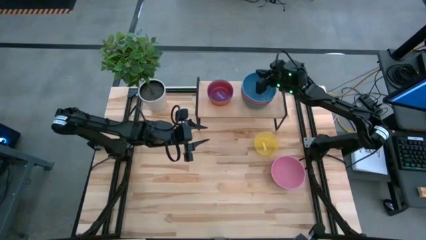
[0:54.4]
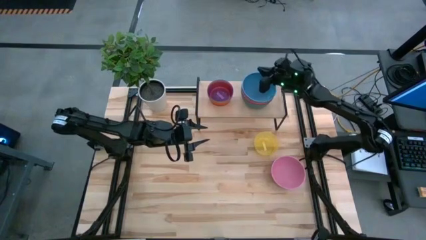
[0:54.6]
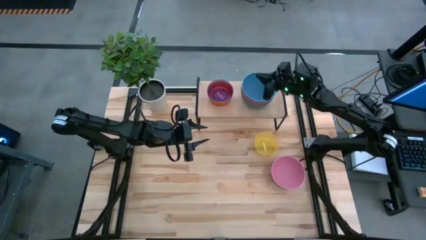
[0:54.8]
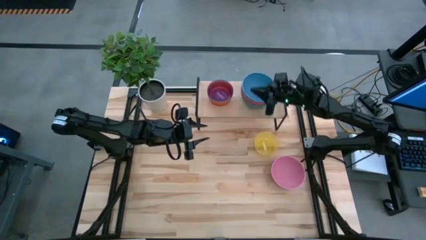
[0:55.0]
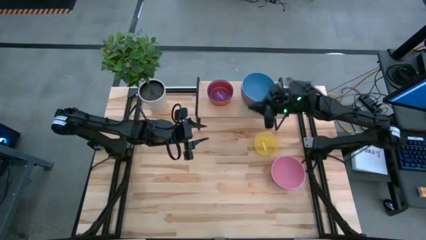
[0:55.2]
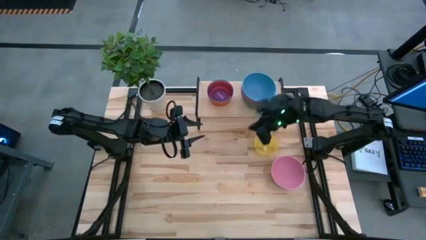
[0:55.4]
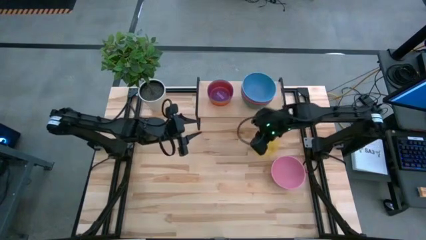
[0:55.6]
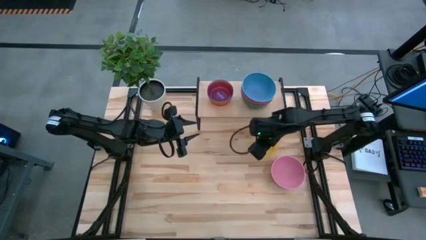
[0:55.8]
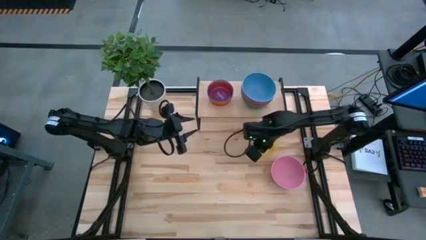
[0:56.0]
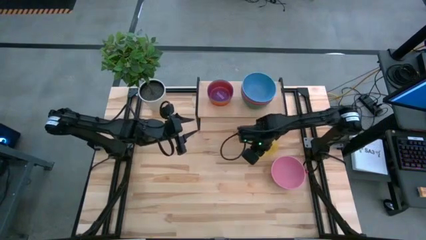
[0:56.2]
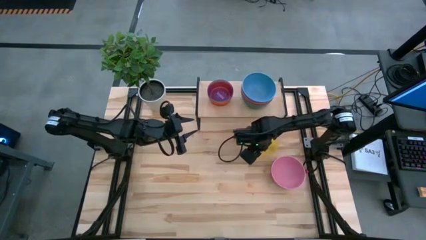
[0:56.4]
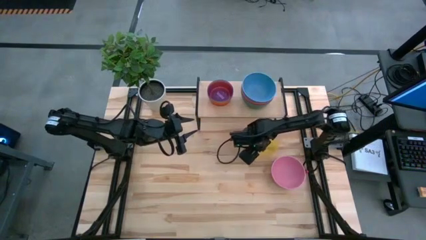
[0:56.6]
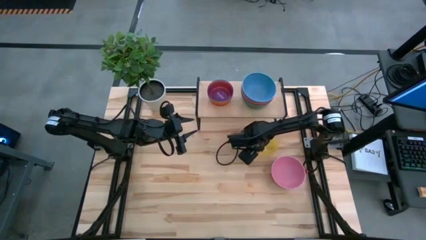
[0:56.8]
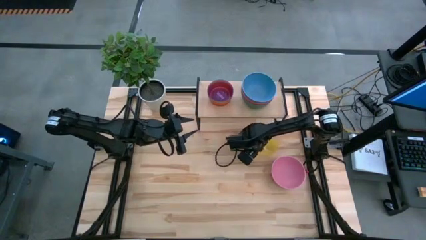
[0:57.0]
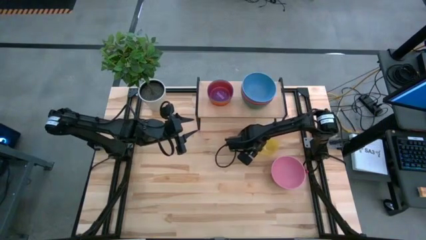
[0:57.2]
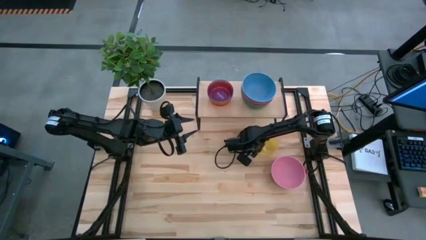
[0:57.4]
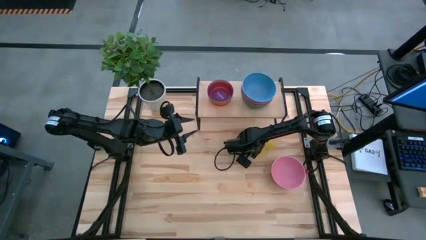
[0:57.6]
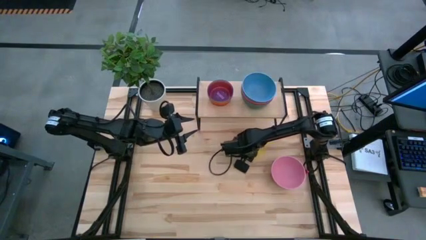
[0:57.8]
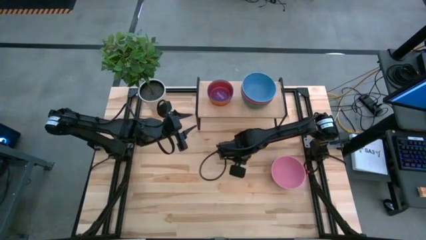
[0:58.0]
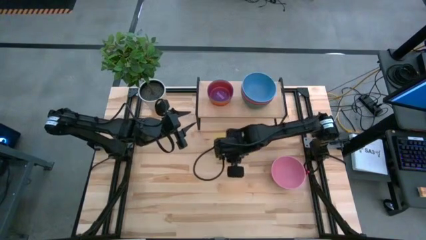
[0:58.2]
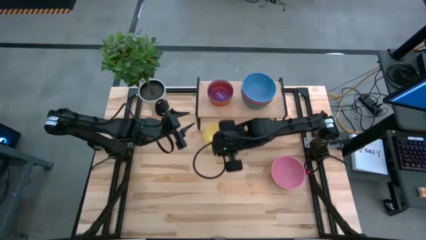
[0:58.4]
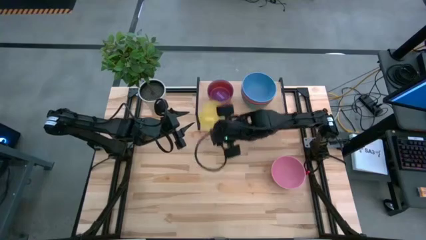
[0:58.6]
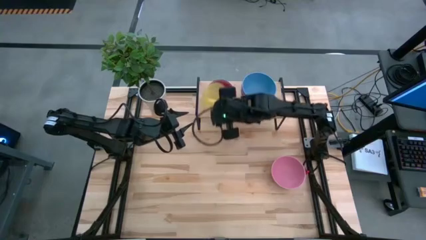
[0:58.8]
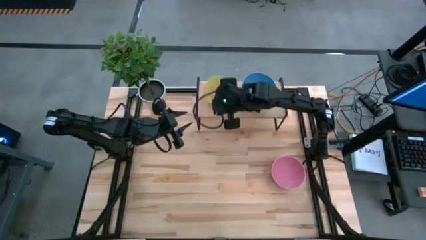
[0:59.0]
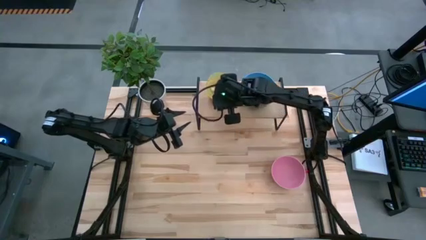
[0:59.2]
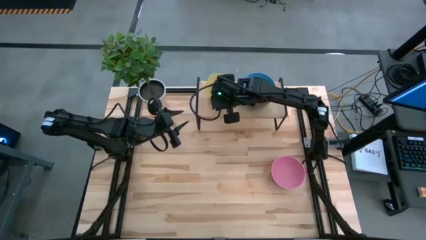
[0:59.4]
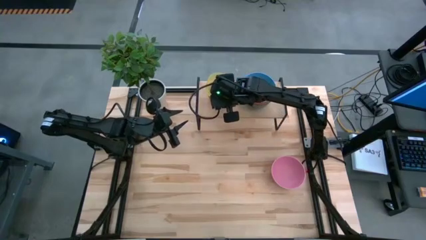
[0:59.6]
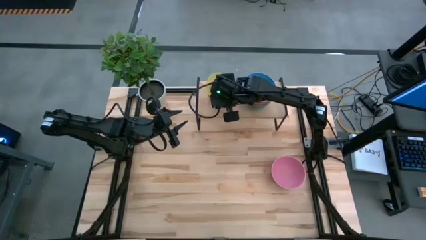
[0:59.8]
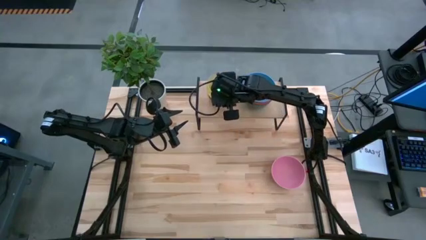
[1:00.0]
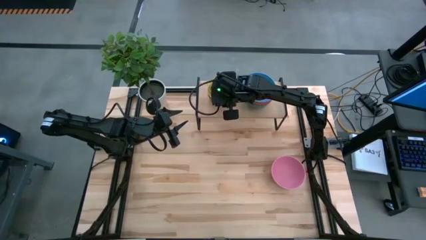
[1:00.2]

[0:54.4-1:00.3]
Task: Place and stack bowls onto a shelf
Stack the small yellow bowl on top of the small purple bowl on the shelf

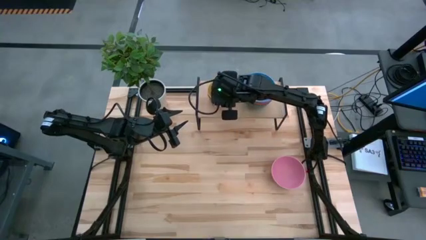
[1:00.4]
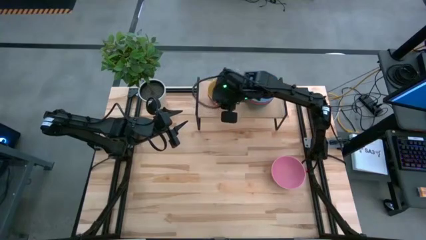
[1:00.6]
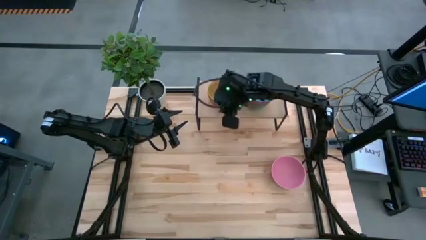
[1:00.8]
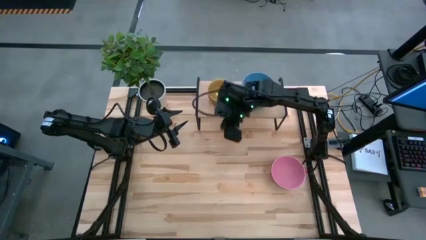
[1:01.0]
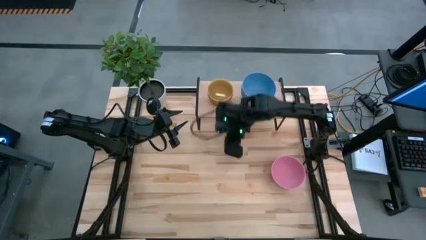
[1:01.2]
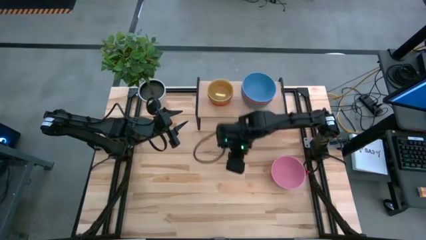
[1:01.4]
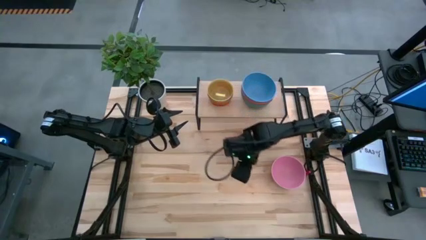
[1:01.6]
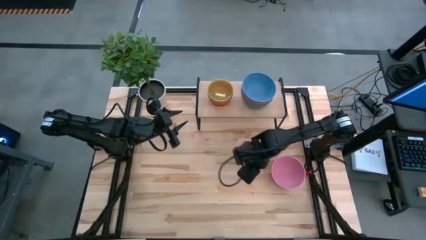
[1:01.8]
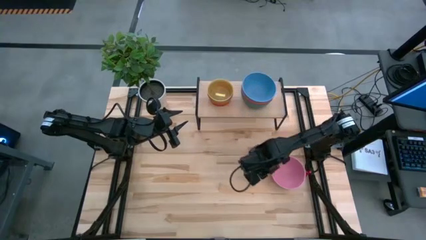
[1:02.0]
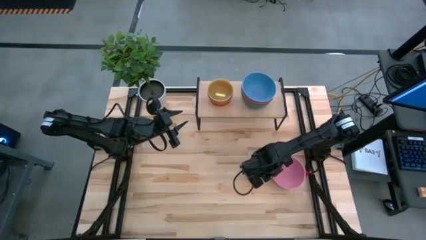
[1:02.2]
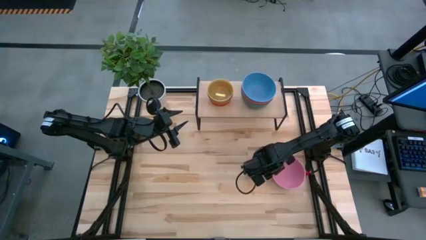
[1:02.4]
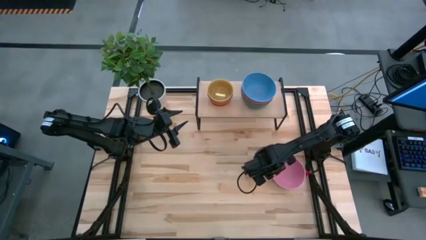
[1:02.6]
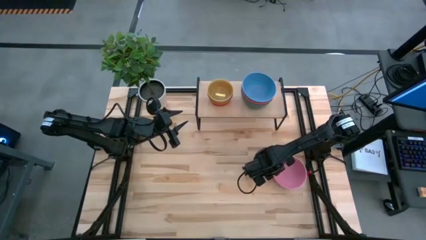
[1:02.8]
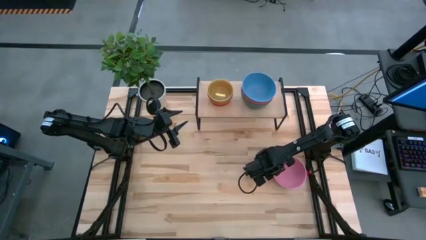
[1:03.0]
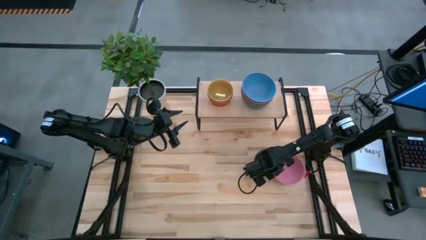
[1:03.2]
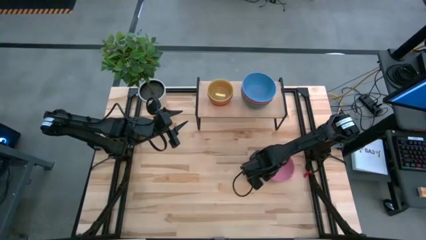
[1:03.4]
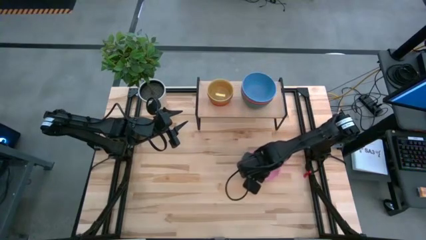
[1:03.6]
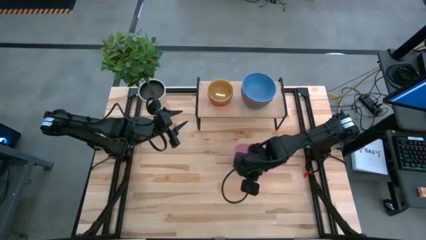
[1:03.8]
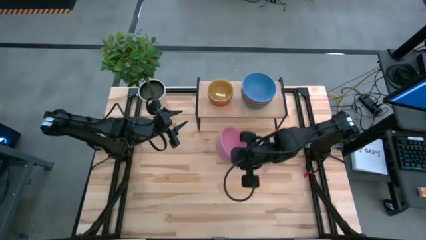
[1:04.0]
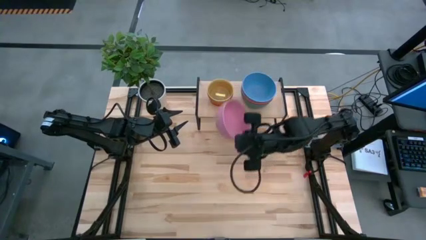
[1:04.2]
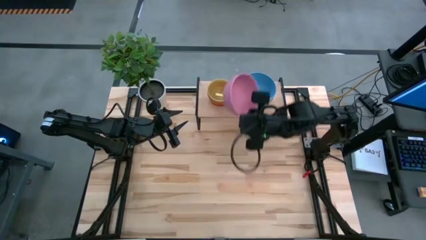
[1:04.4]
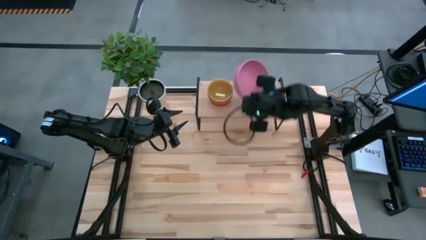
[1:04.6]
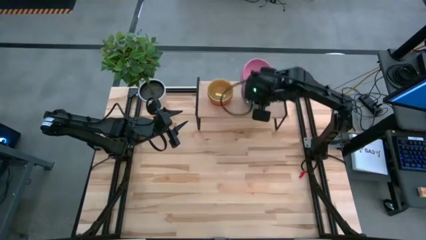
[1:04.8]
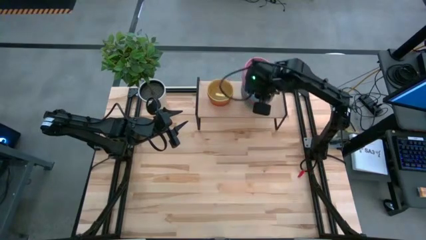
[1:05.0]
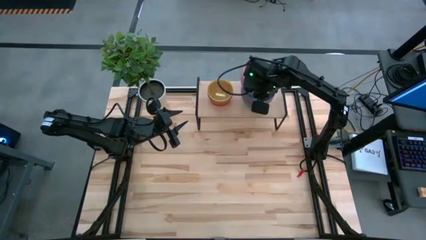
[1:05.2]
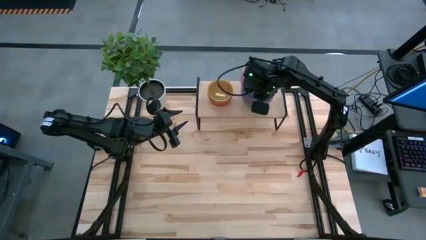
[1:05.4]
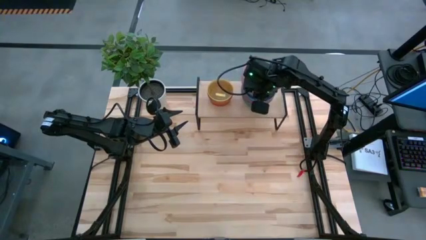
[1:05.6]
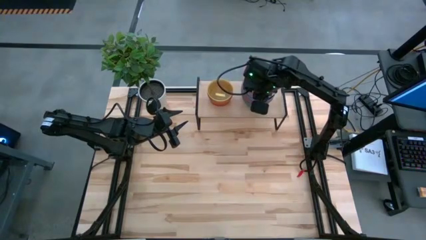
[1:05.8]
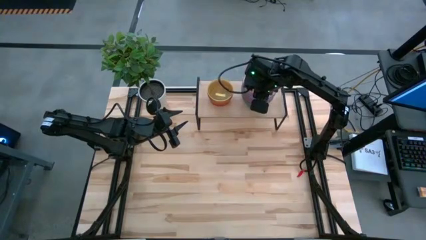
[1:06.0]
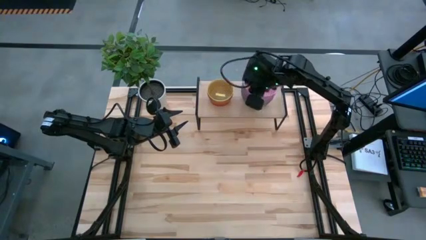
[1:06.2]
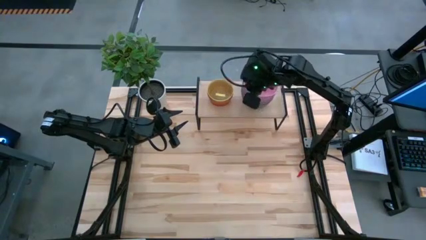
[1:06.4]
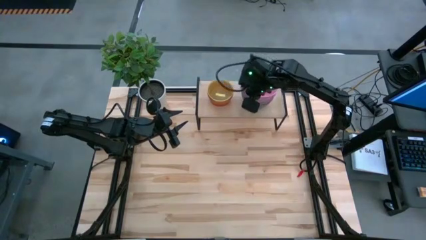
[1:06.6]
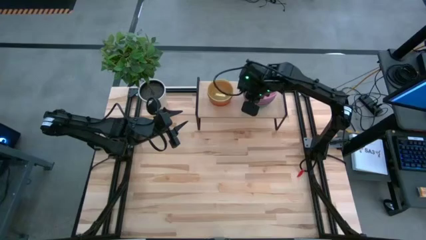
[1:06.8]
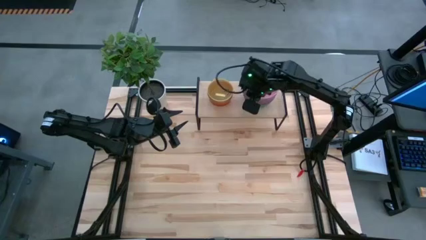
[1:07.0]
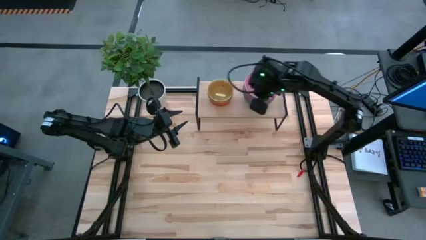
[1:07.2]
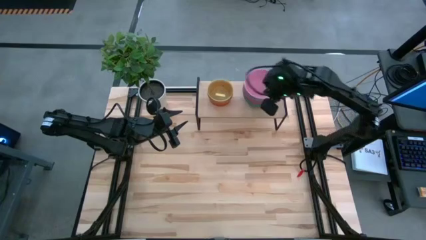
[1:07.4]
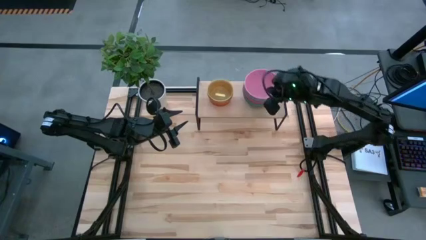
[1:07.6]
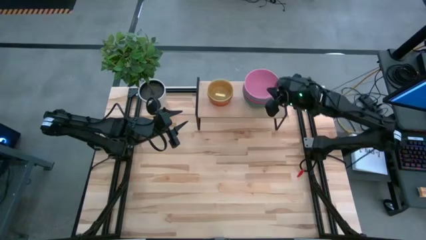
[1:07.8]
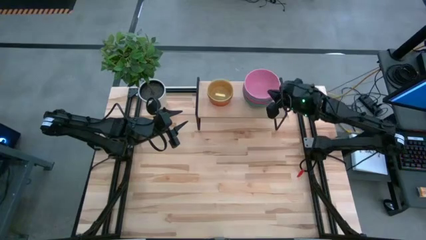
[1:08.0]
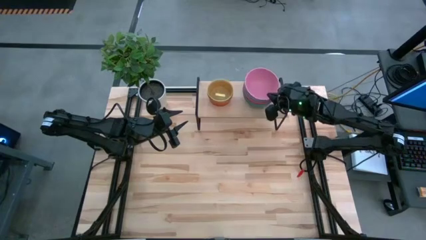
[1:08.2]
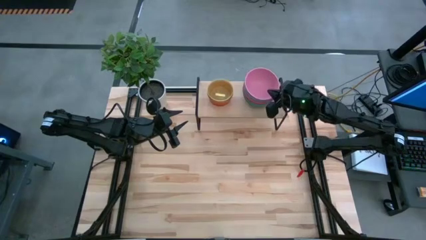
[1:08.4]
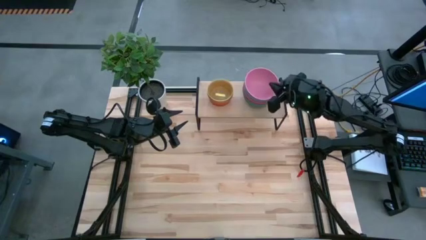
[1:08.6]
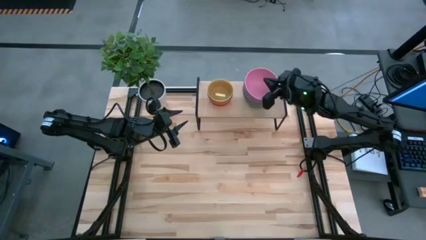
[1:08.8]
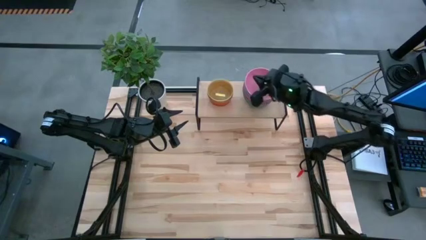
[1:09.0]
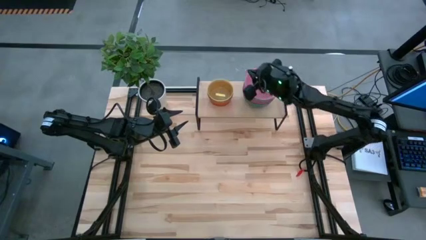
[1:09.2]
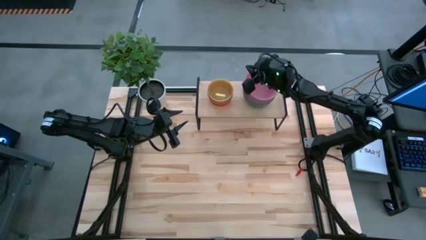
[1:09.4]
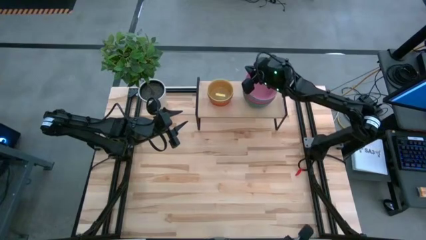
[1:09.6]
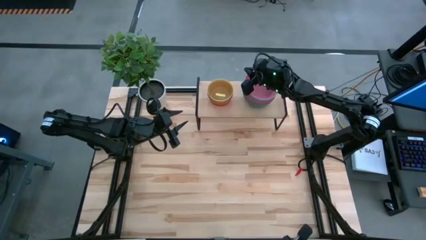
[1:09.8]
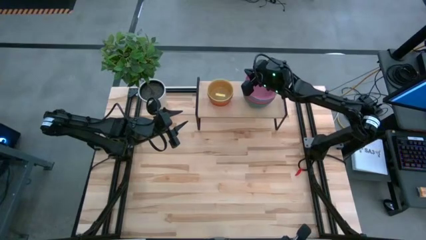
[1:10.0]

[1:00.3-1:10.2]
Stack the large pink bowl on top of the large blue bowl on the shelf

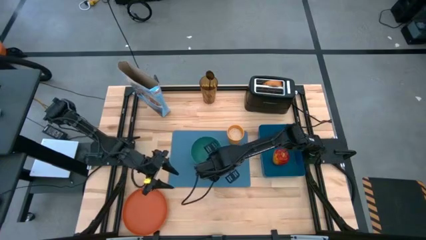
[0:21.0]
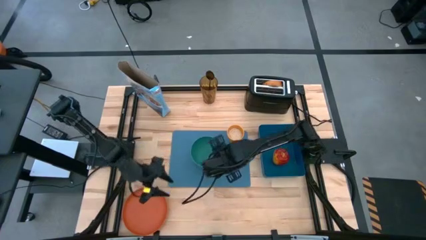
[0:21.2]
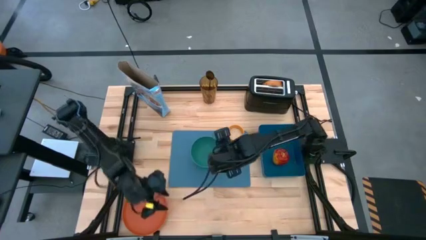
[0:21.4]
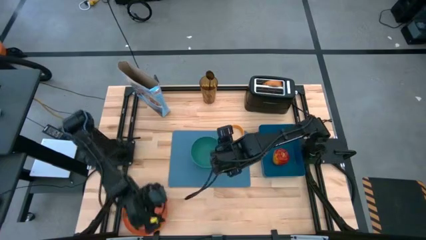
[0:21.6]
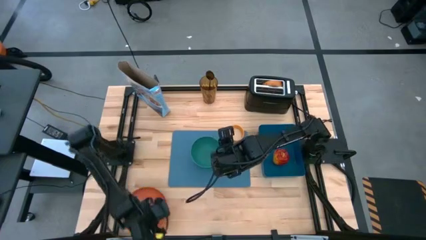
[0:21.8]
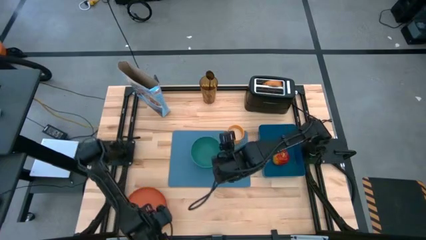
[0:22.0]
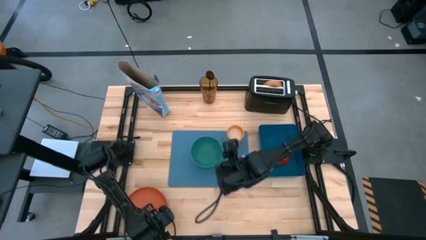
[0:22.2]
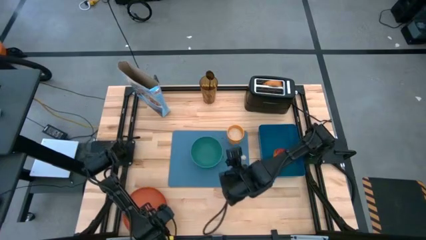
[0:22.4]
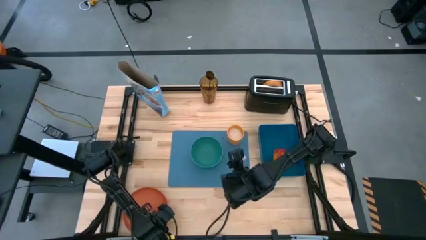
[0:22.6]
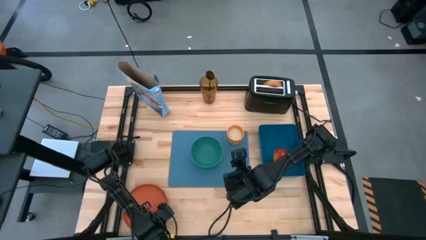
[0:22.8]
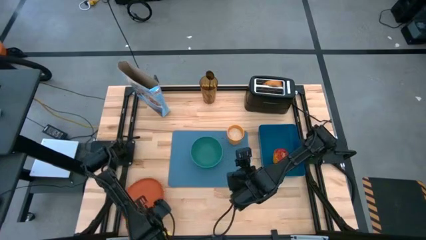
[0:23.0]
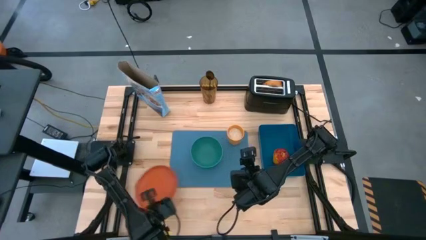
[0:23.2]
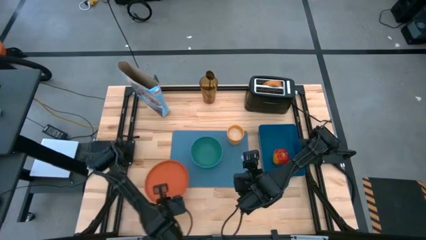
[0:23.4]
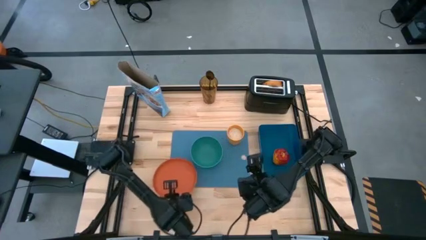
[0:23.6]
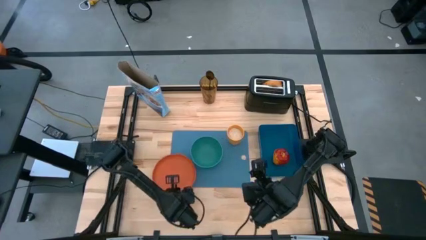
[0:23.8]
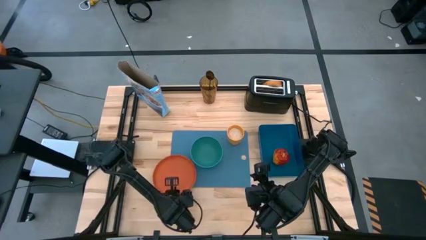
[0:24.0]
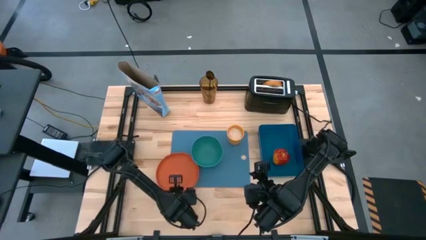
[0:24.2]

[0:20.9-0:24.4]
Task: Arrange a breakfast setting
Put the orange plate on the light blue mat
